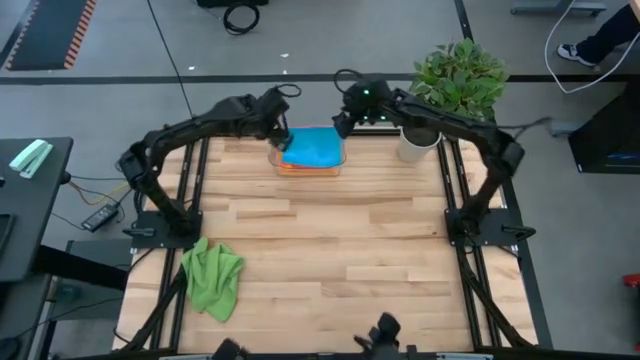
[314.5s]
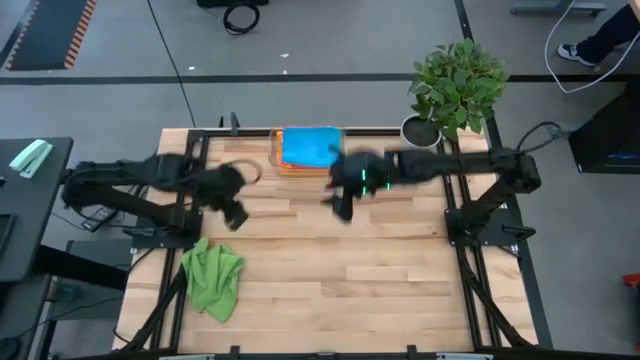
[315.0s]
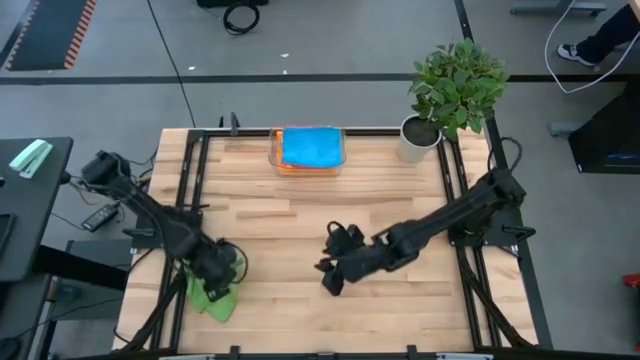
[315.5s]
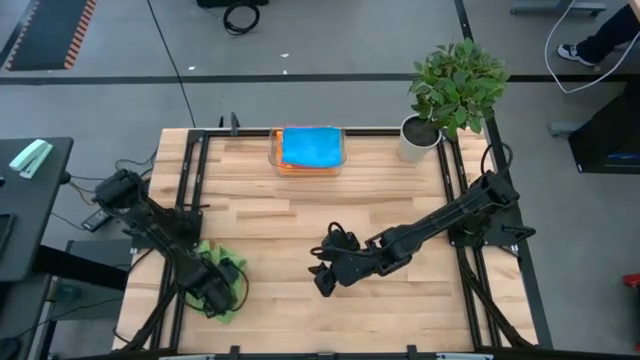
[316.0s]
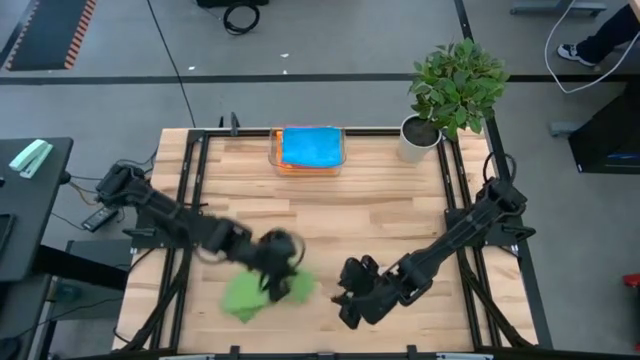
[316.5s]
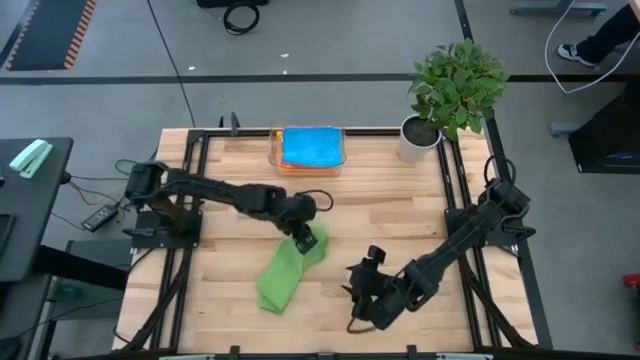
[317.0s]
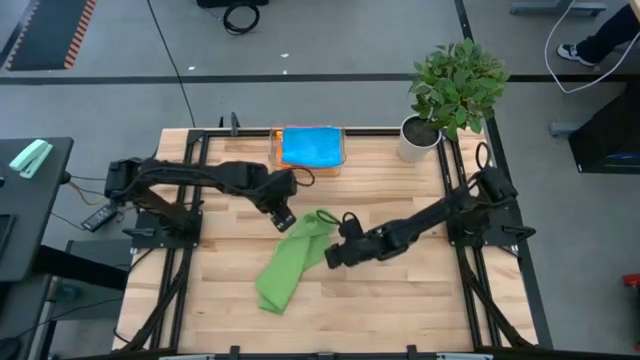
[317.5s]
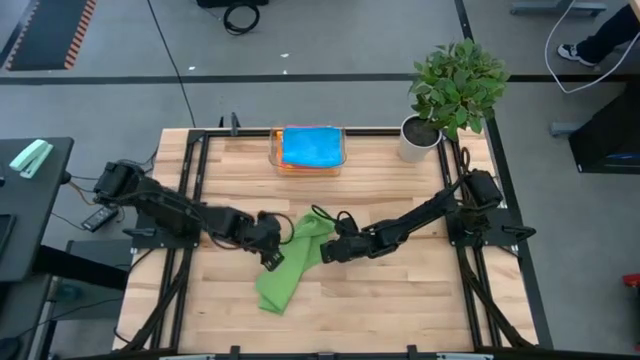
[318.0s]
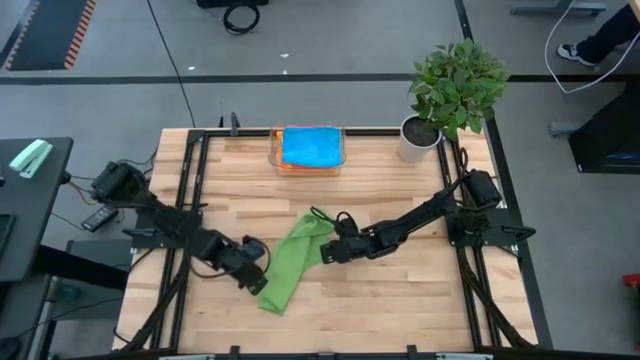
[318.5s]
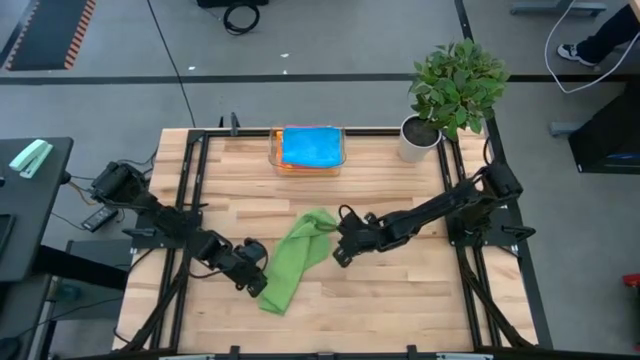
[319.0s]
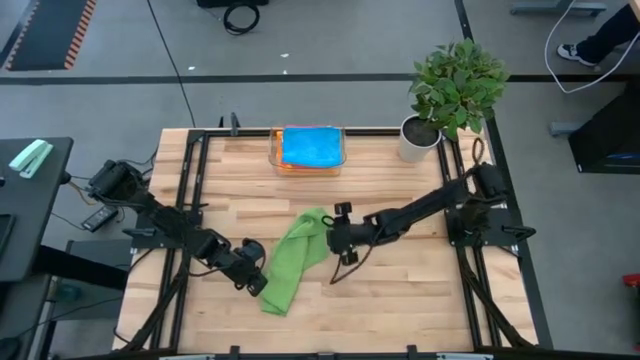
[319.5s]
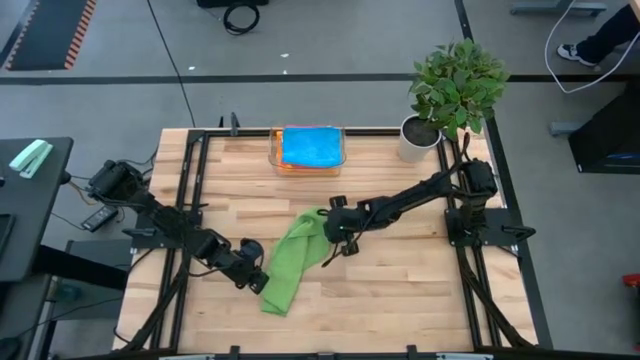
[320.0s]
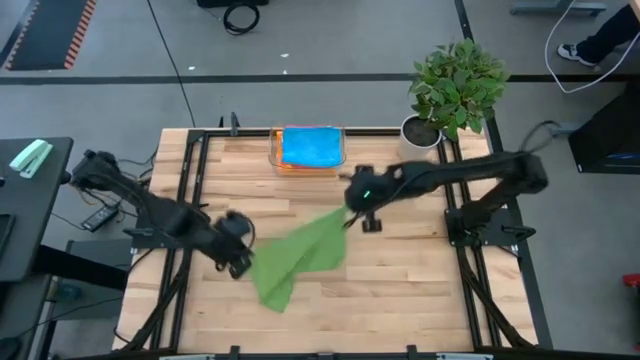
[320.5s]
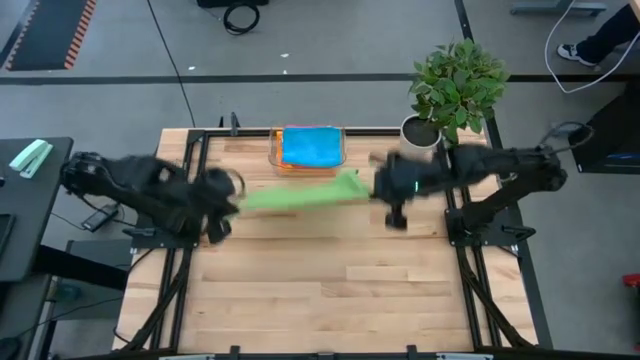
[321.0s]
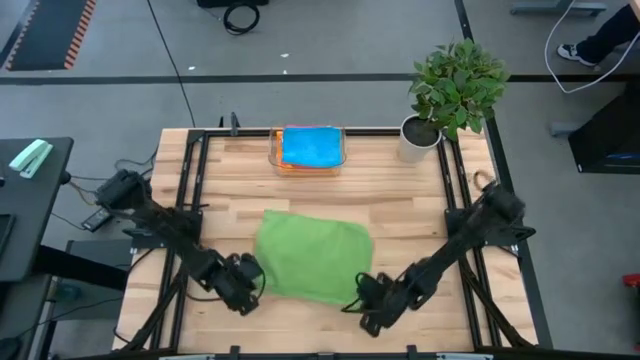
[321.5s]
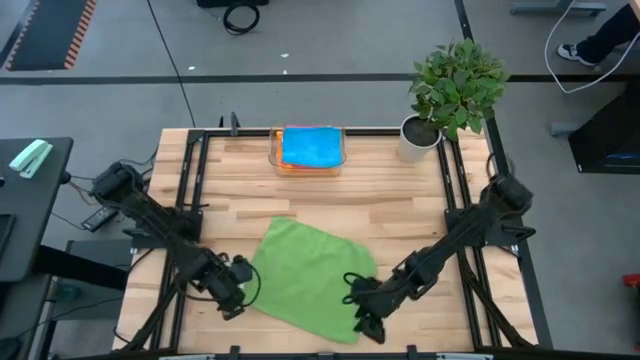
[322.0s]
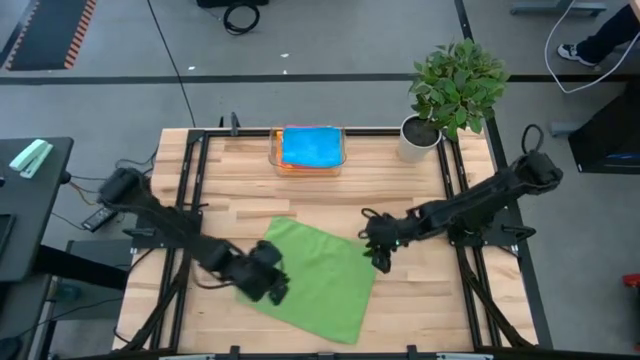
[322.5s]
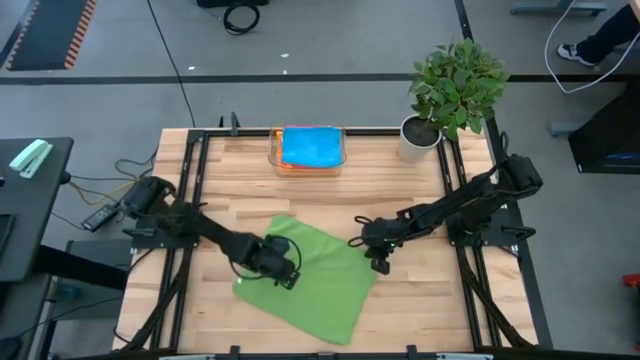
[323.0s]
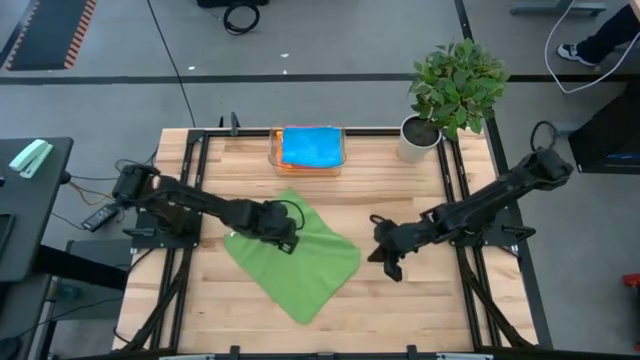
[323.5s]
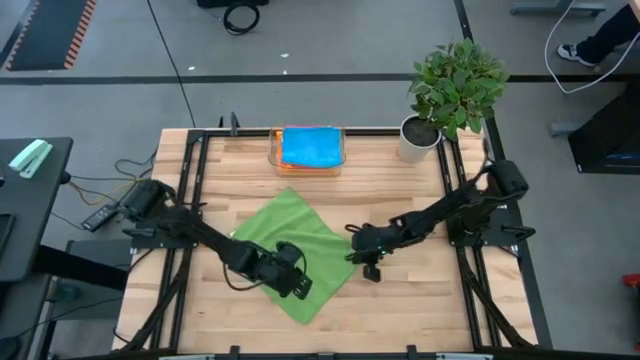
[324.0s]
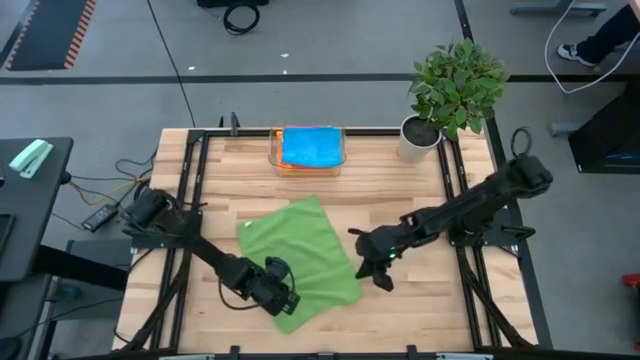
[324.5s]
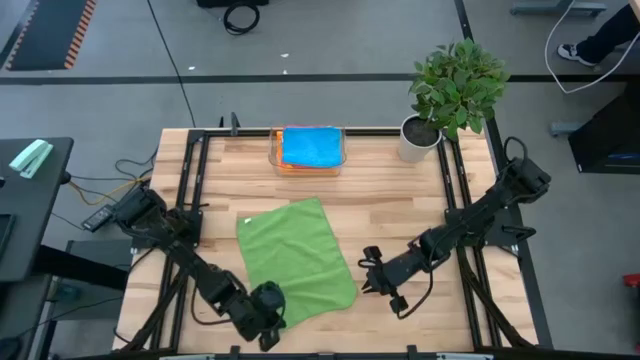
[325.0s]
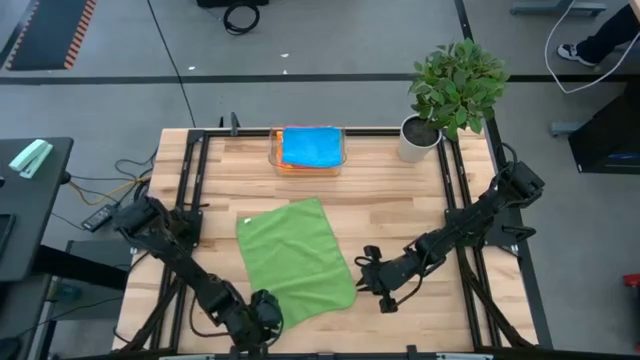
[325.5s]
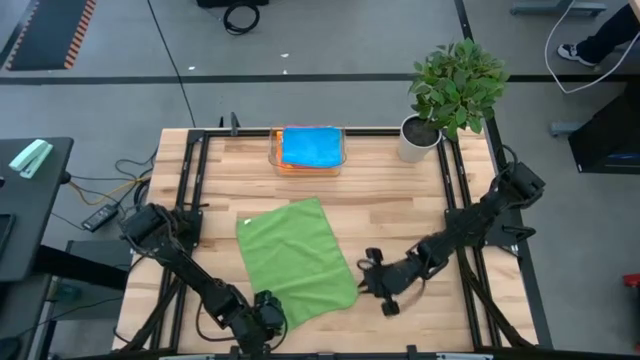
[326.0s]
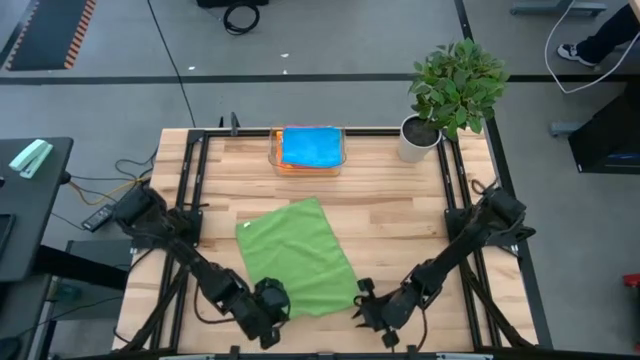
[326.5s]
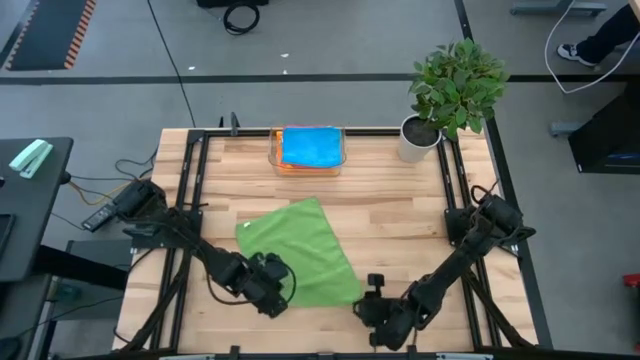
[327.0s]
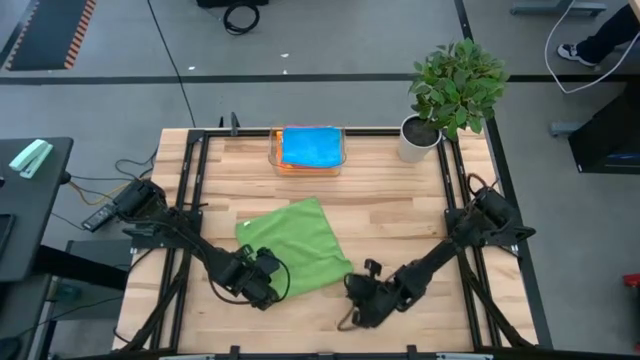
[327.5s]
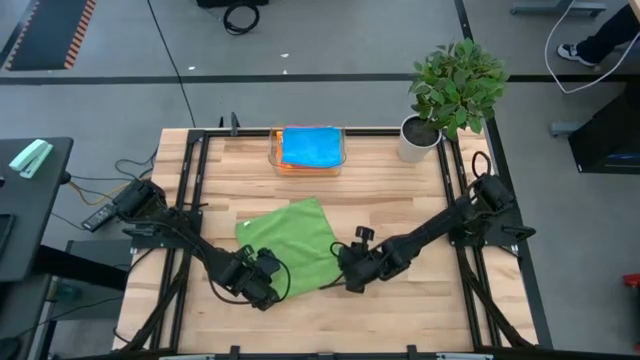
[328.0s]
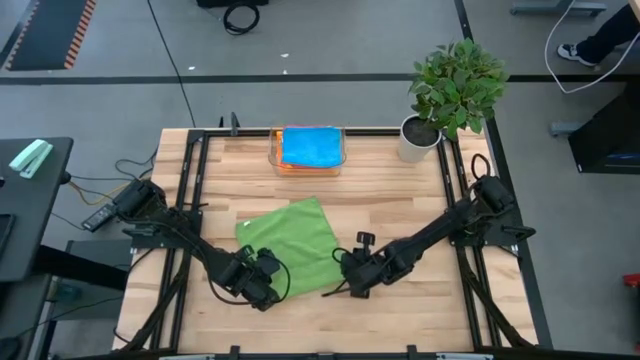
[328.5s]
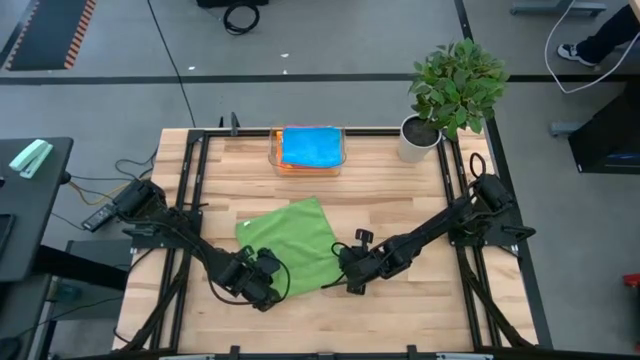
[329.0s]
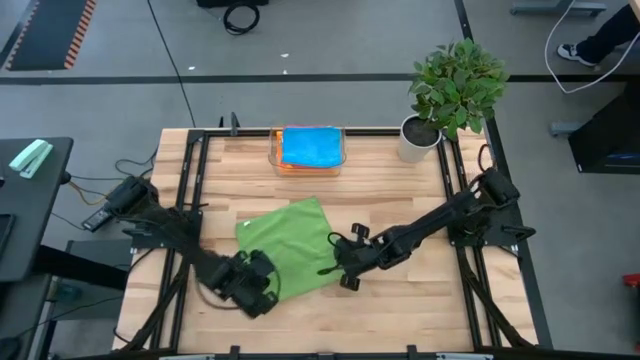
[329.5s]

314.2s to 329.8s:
Task: Fold microfiber towels
Fold the green microfiber towel

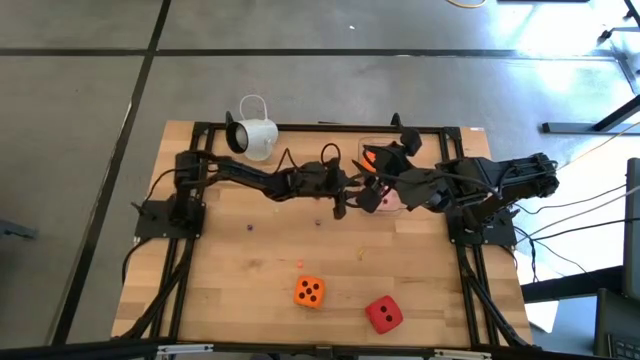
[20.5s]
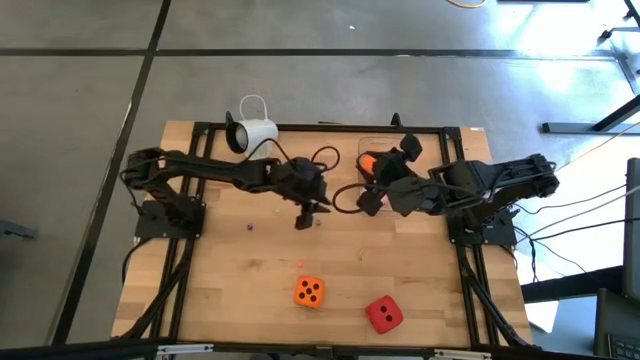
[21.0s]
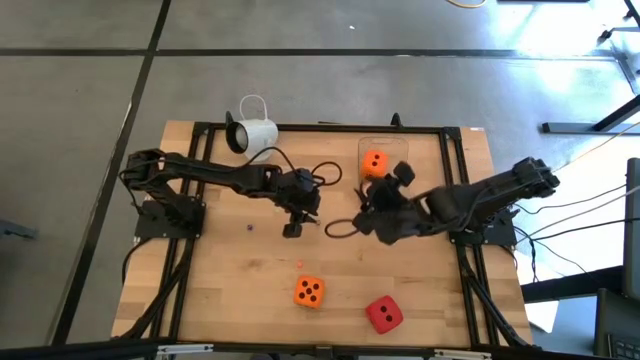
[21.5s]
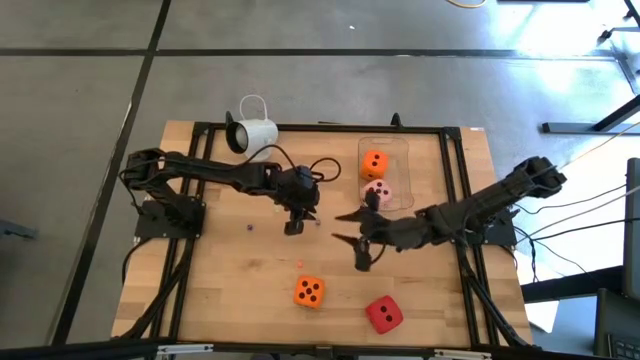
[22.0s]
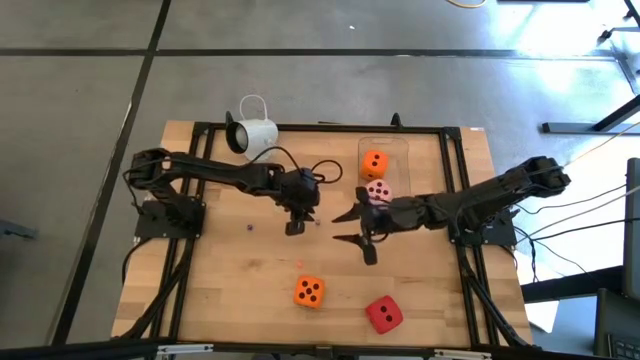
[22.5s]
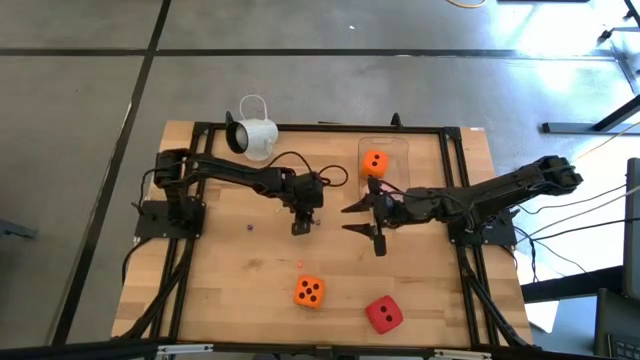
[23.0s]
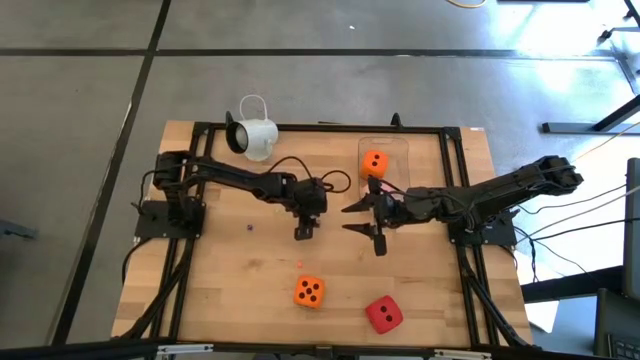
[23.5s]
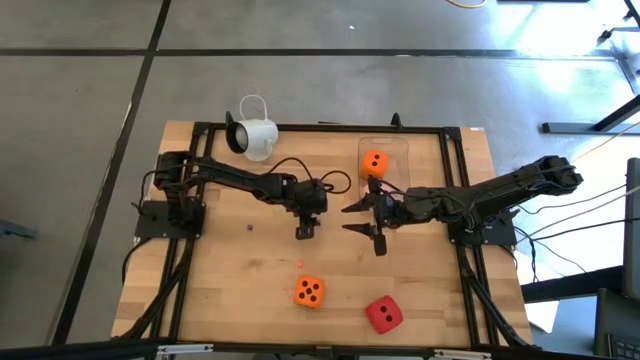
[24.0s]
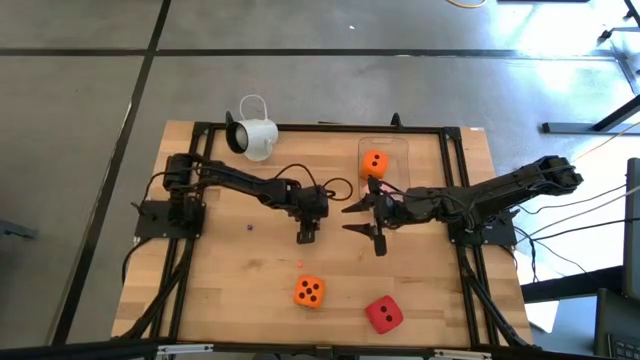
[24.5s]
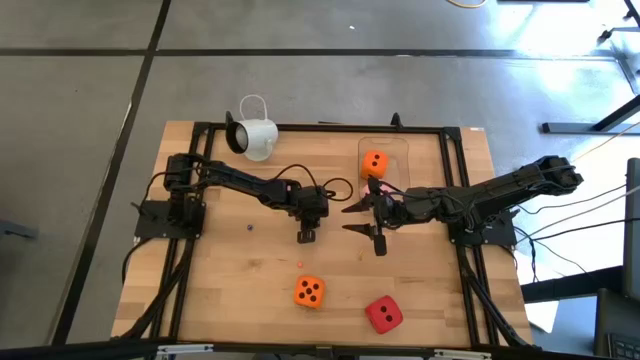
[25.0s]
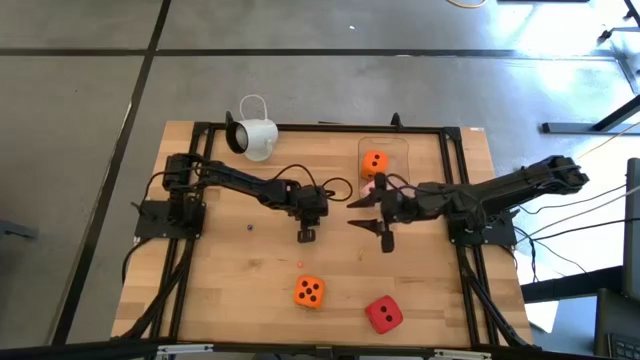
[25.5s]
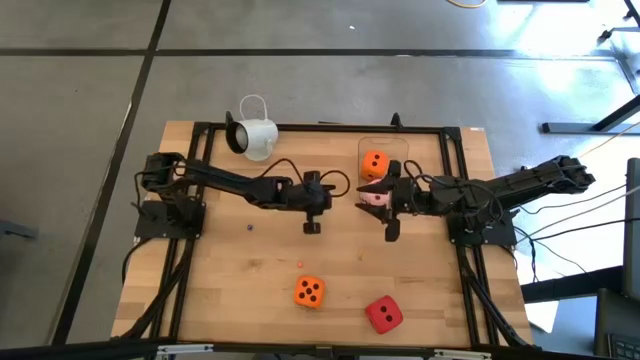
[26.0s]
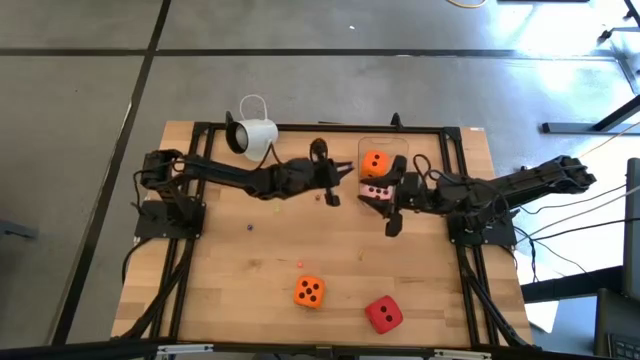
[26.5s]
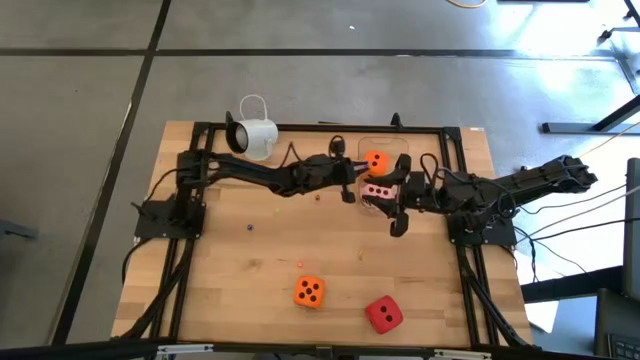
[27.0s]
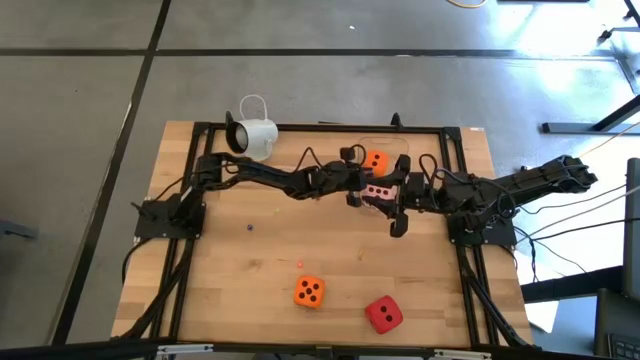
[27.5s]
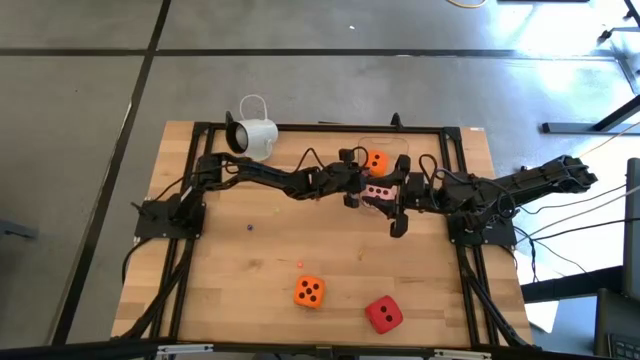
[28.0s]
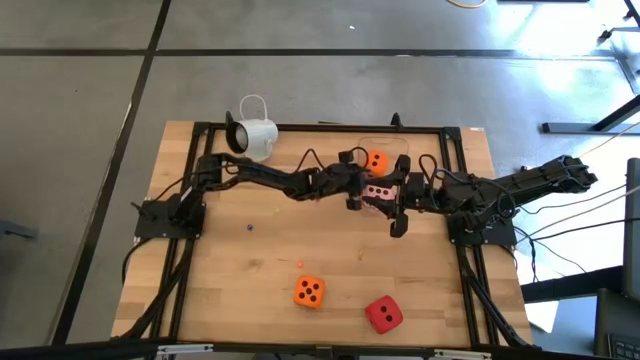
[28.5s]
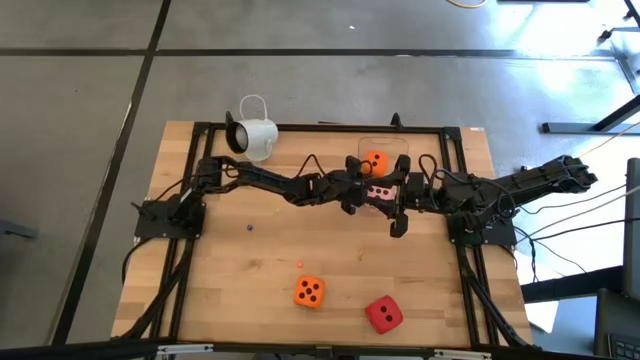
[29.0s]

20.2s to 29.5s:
Task: Pick & Place Dice
Put the right small blue die into the transparent bin
